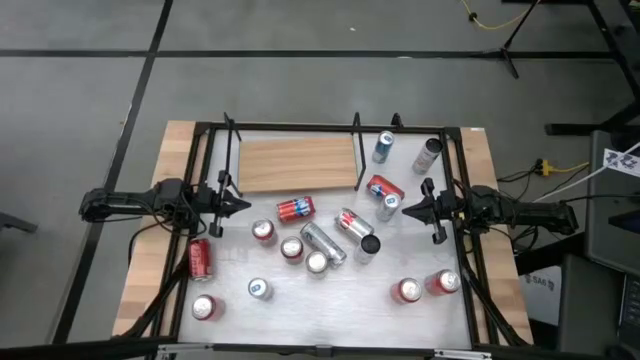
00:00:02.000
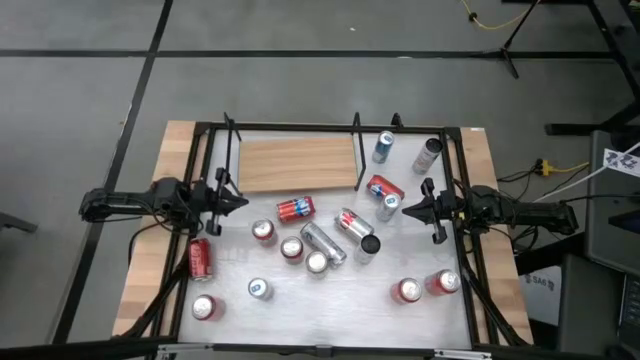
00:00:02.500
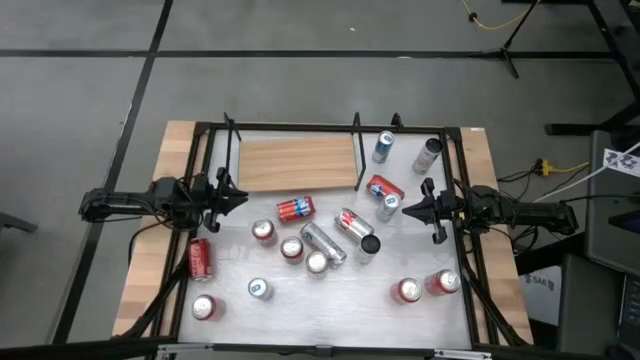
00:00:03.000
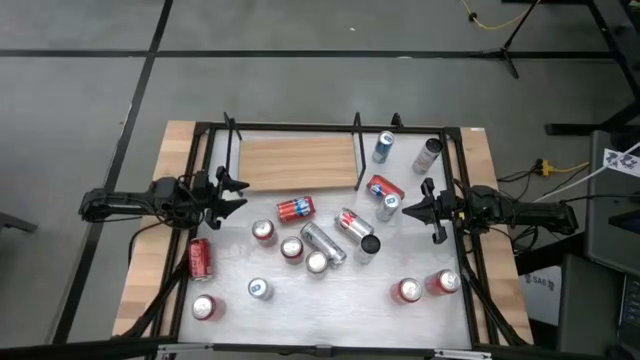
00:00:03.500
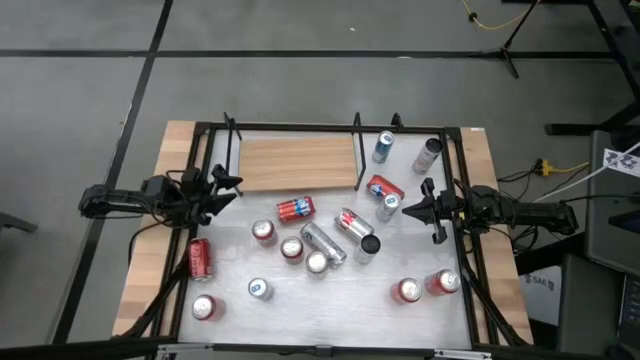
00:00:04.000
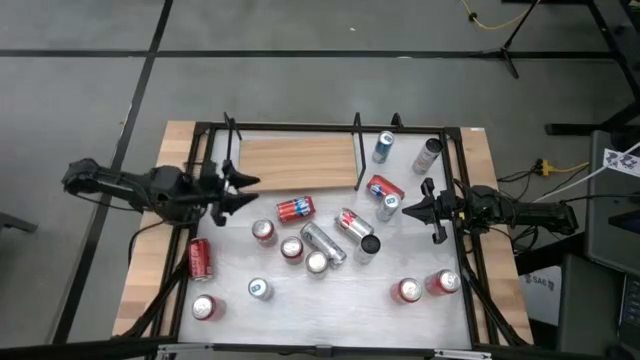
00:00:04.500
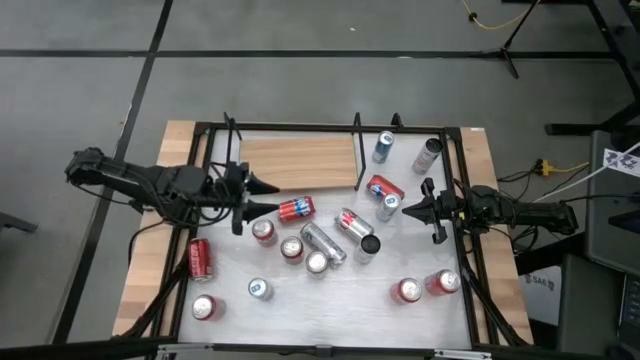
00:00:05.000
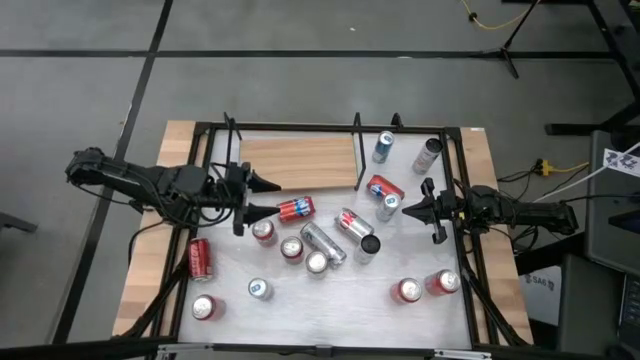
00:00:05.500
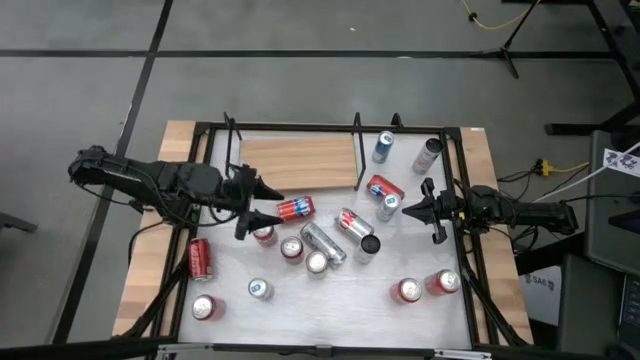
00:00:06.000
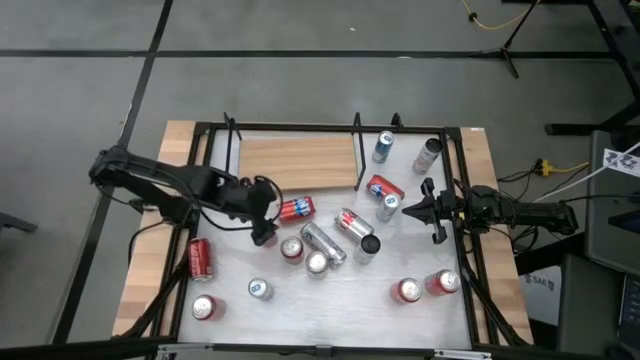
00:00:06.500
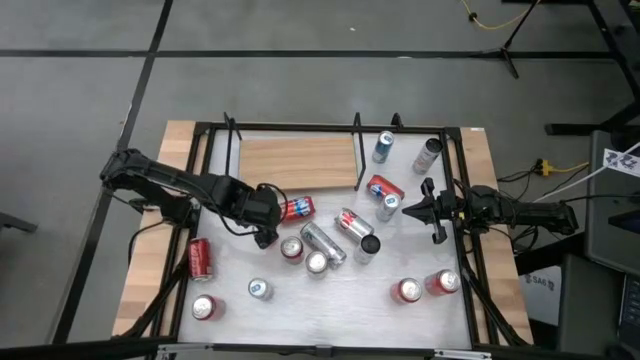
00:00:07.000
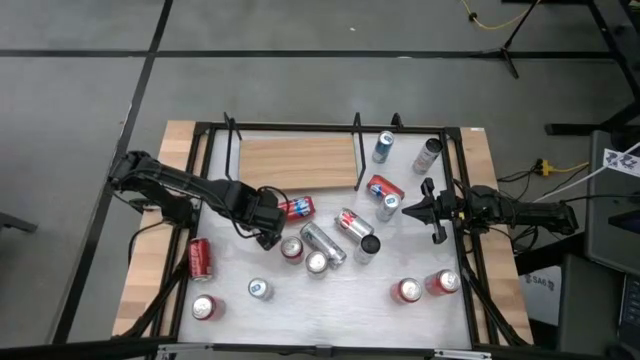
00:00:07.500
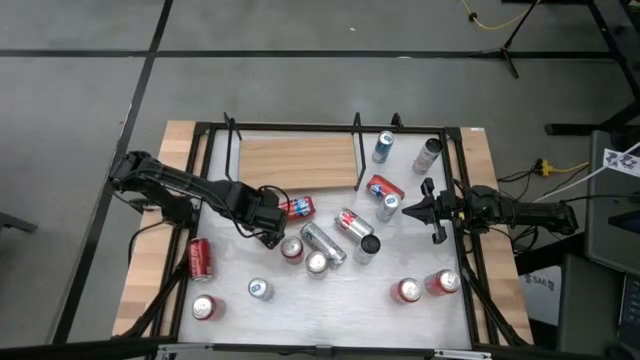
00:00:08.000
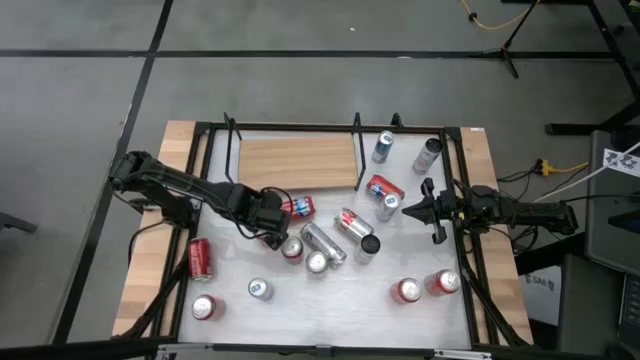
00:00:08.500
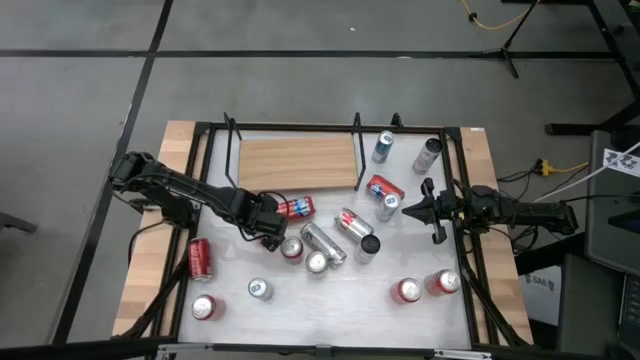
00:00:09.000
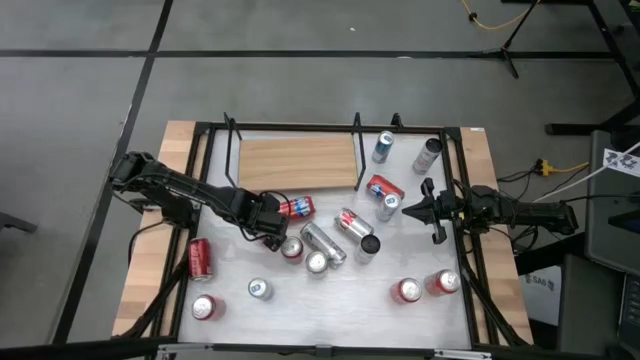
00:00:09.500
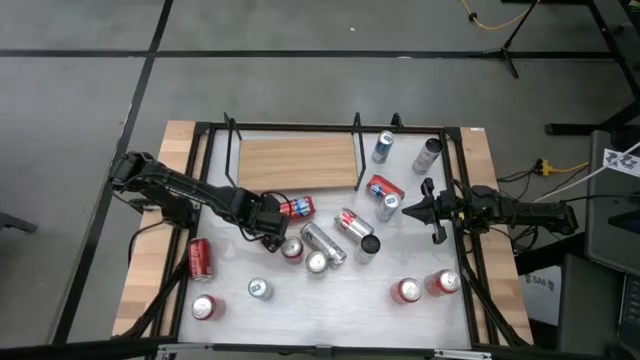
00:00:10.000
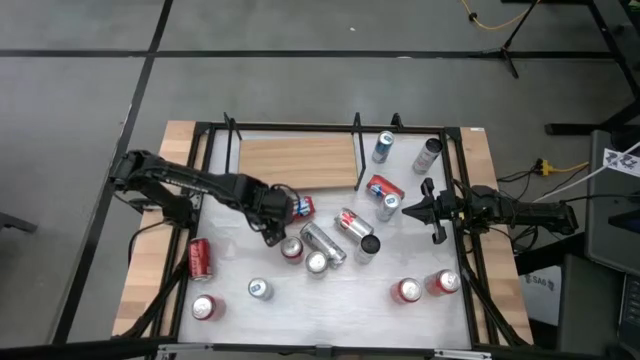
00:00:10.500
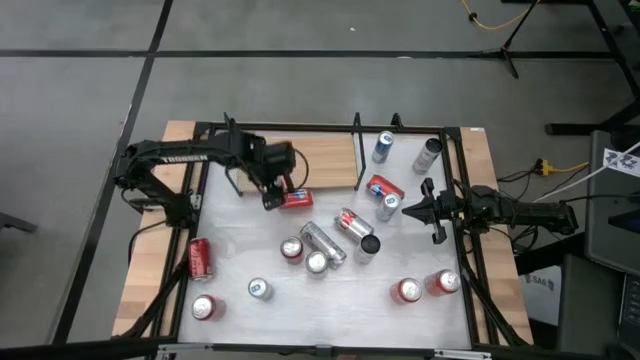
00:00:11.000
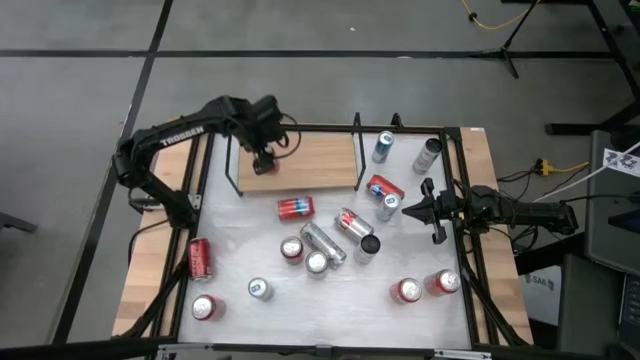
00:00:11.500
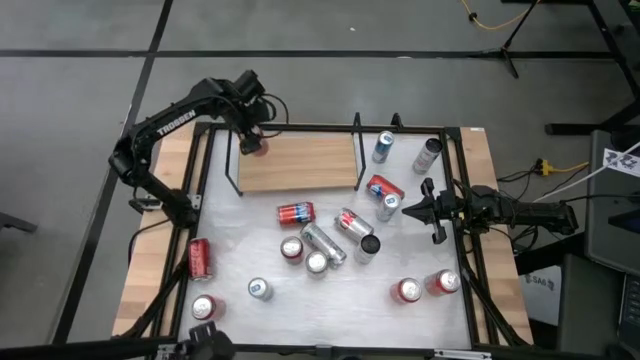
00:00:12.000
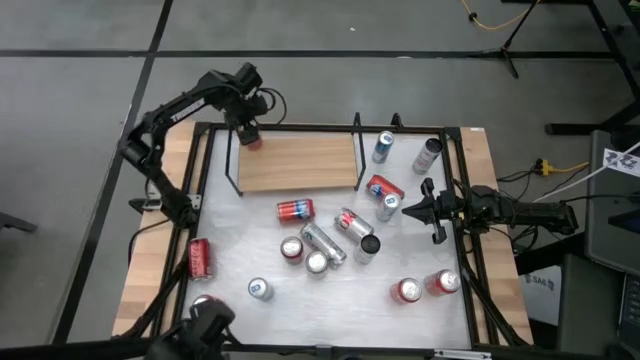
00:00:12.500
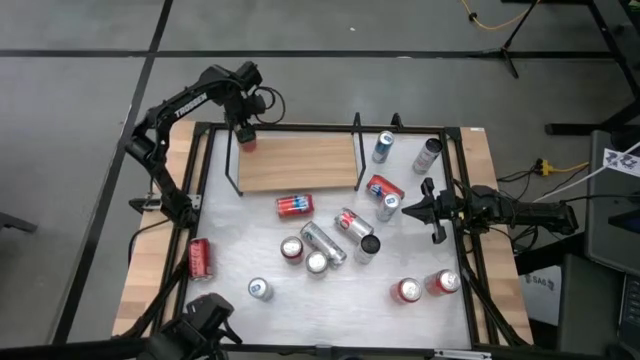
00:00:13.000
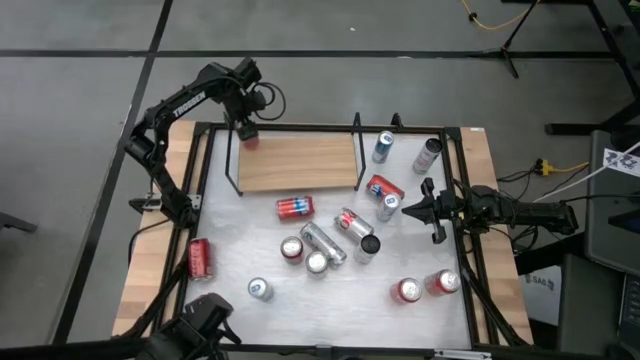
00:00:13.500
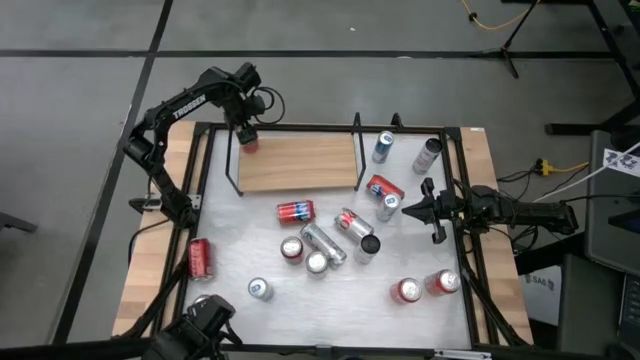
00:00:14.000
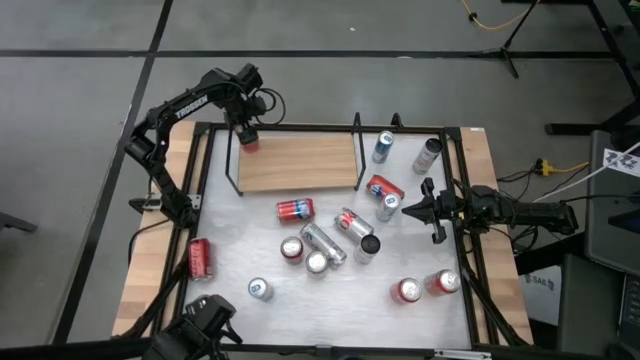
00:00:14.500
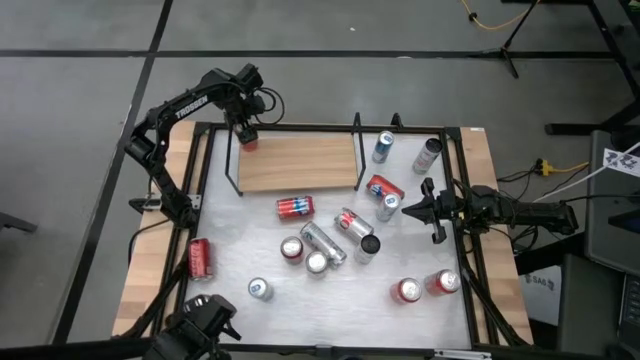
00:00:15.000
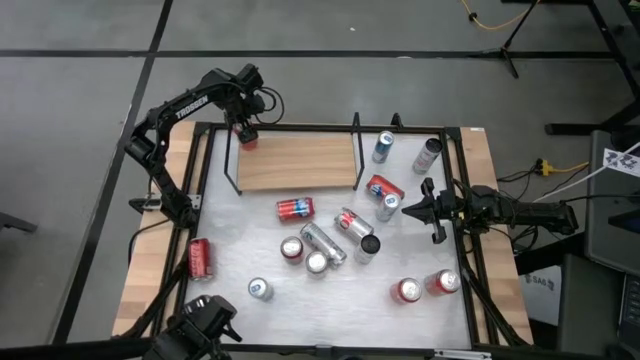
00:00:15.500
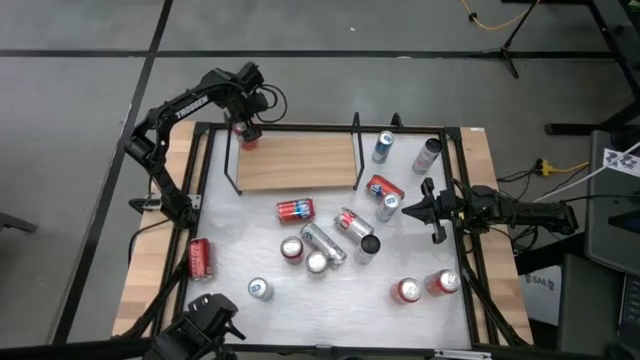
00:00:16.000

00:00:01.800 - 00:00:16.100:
Task: Place canned beverage on shelf
Put the red soda can on the shelf
